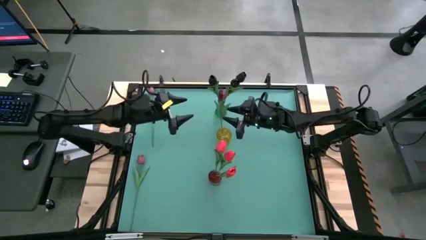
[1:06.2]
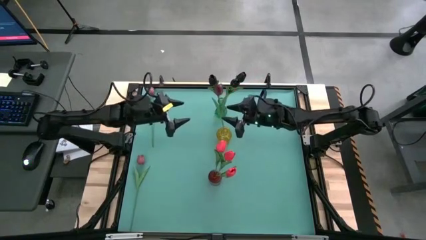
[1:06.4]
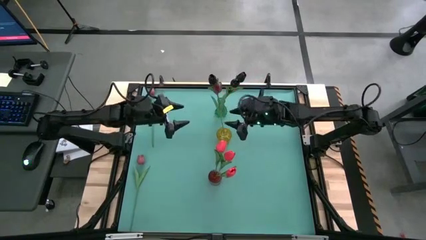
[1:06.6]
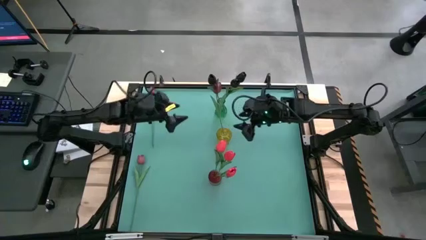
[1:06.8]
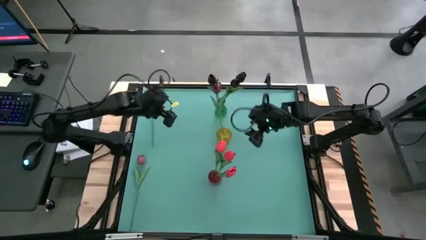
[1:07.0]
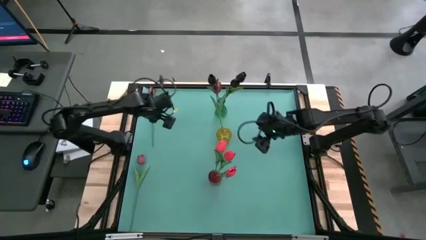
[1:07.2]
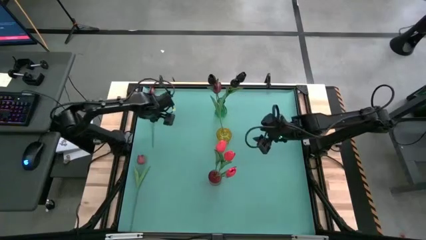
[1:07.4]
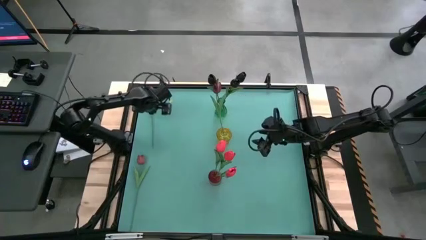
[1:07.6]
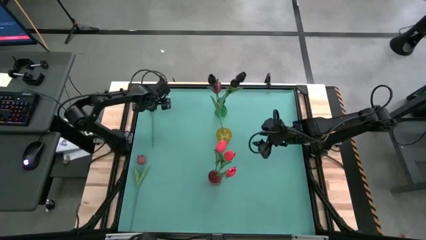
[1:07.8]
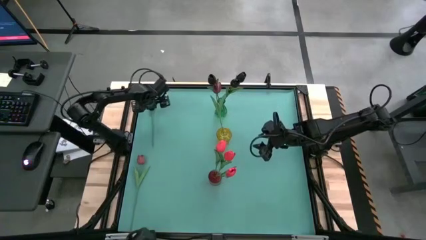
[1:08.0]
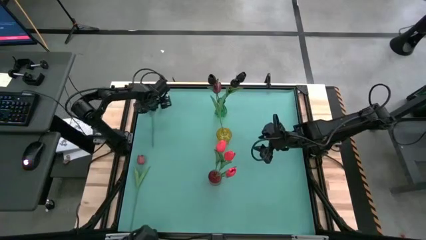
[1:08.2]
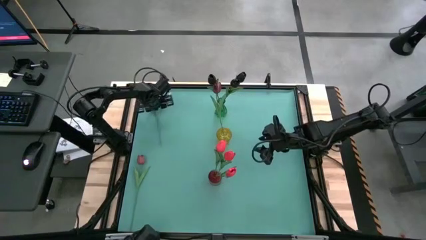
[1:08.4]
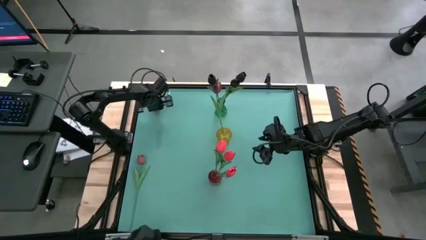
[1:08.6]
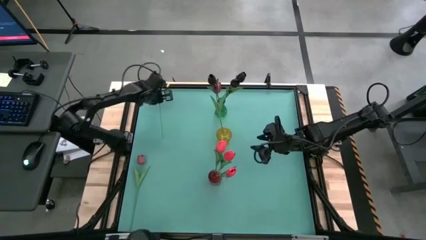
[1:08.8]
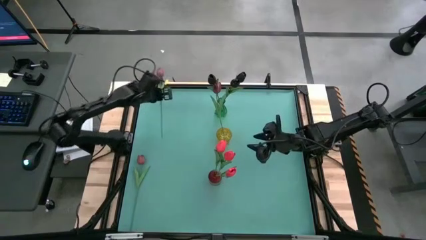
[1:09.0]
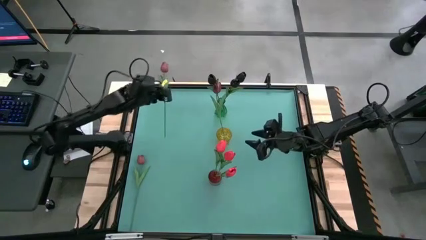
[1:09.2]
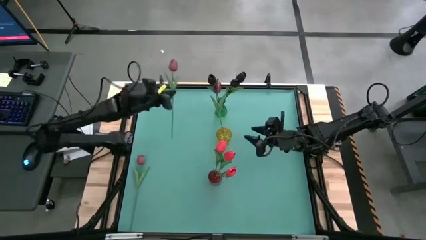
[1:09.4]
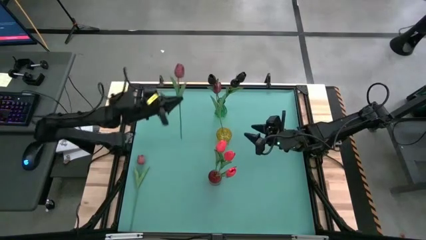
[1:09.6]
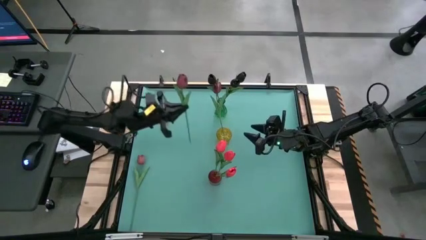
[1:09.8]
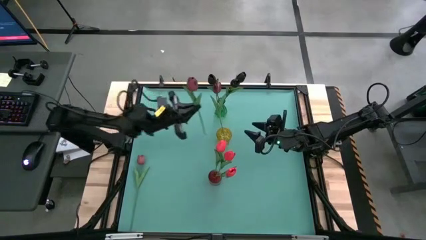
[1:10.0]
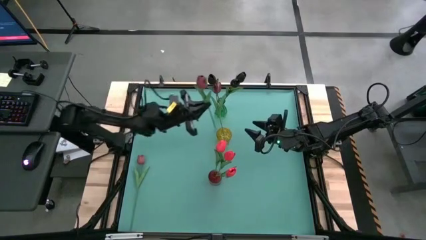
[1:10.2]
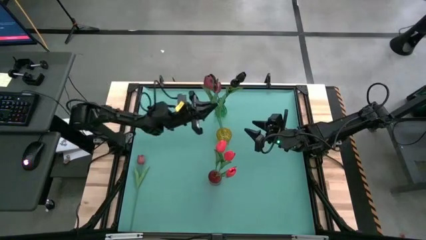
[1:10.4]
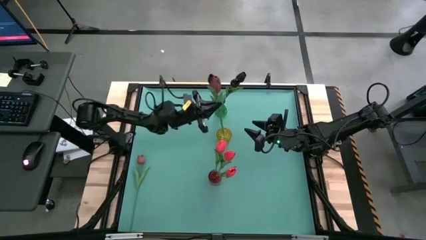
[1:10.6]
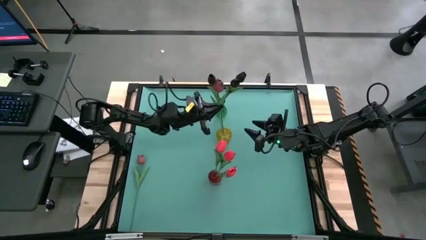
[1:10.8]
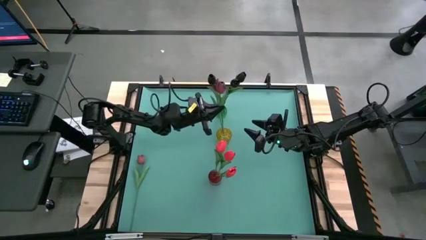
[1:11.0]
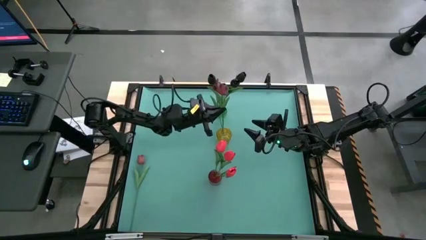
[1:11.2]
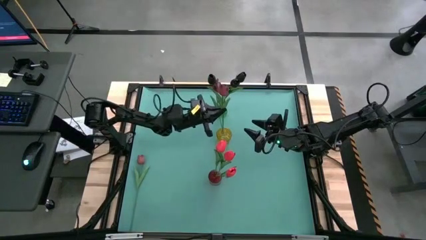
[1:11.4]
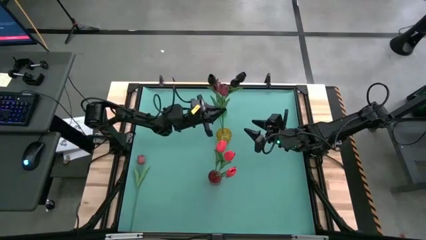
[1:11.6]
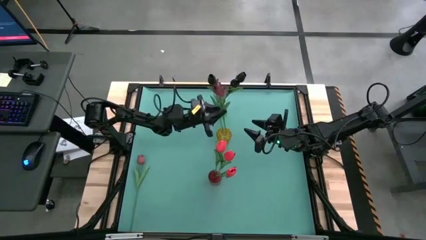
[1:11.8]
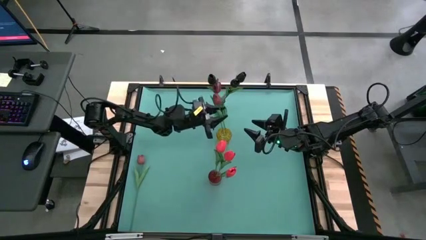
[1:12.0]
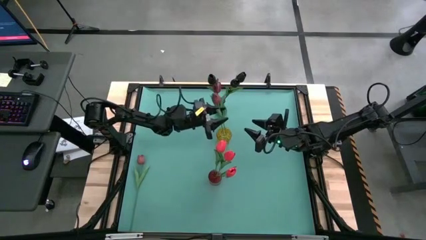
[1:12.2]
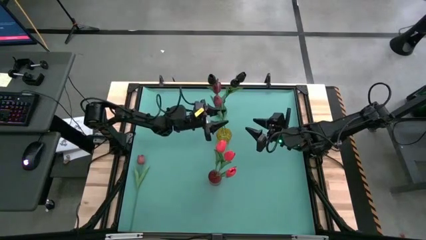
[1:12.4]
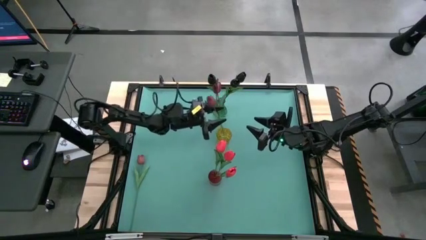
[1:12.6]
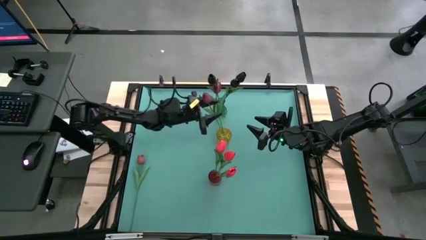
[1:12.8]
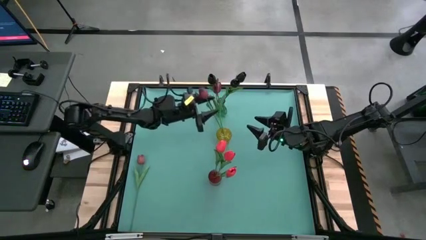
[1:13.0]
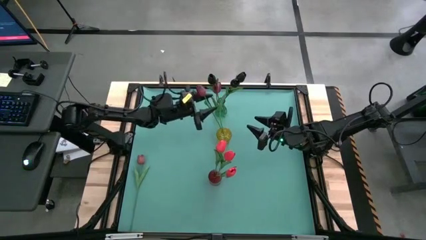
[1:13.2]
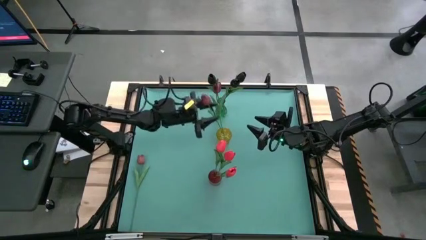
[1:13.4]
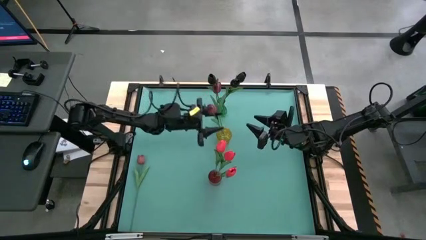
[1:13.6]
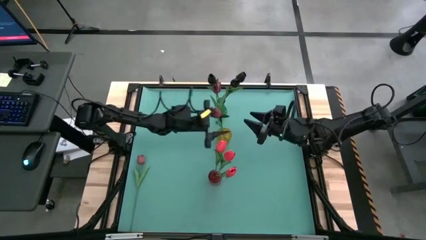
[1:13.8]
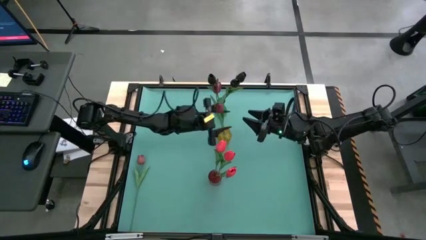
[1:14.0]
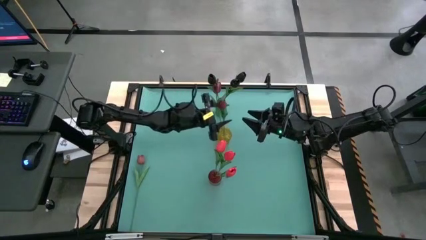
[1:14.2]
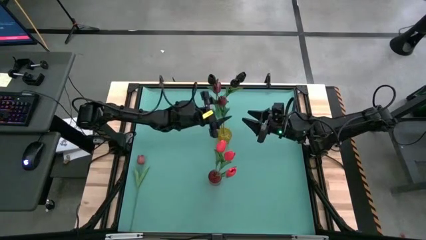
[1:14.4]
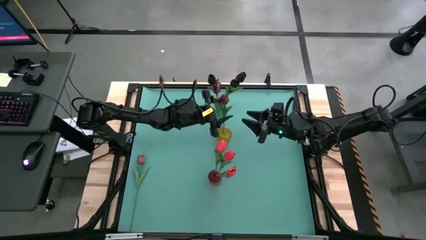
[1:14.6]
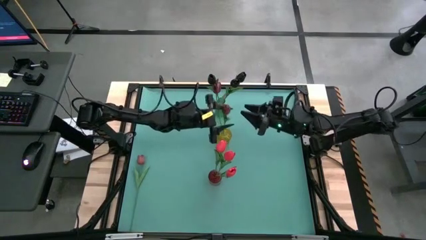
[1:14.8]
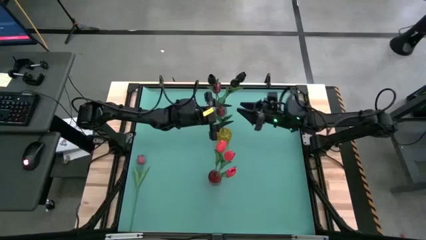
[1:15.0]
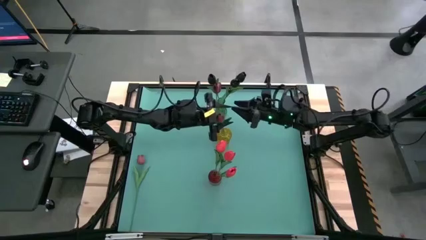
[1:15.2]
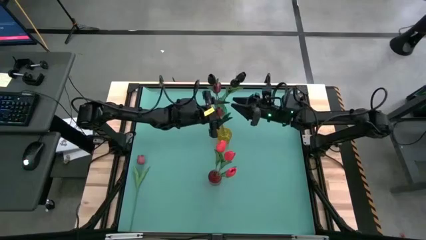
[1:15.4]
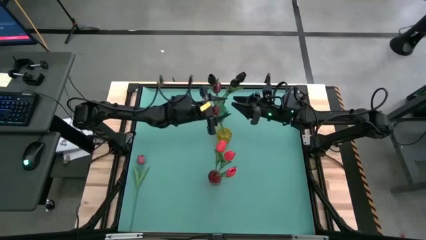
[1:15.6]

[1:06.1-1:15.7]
Task: Sort flowers into vase by color
Put the top red tulip into the yellow vase
